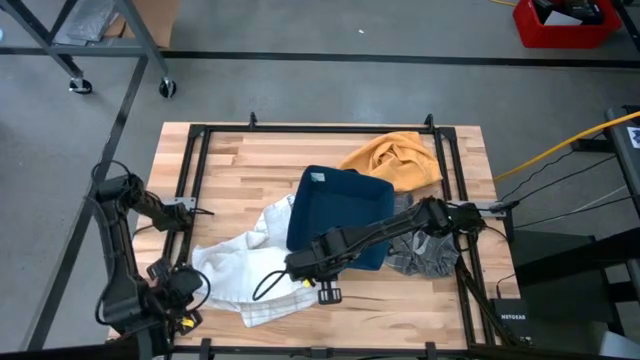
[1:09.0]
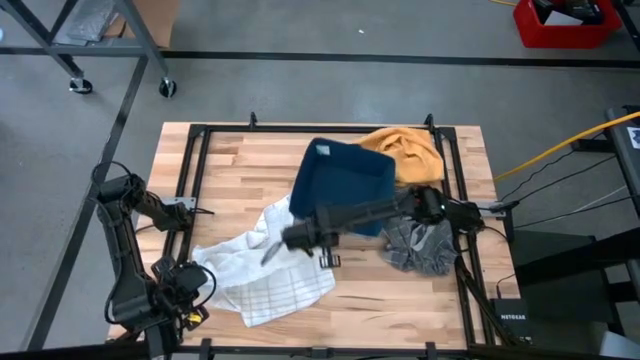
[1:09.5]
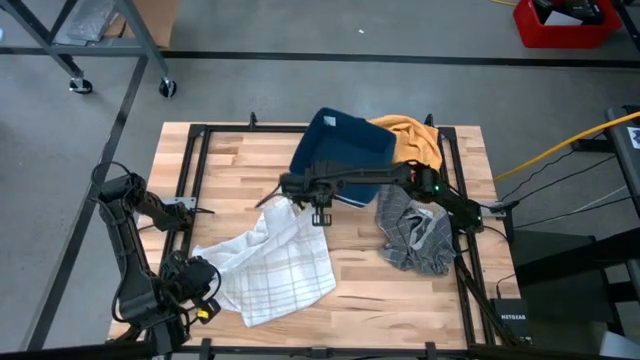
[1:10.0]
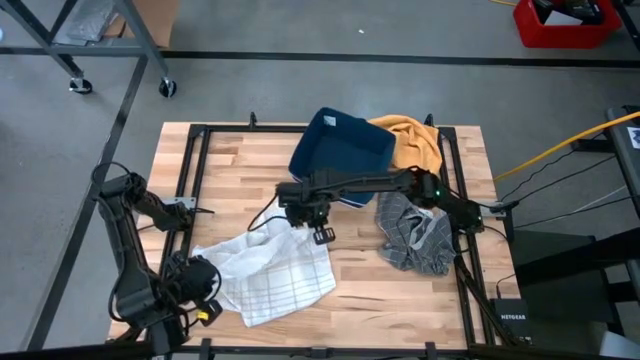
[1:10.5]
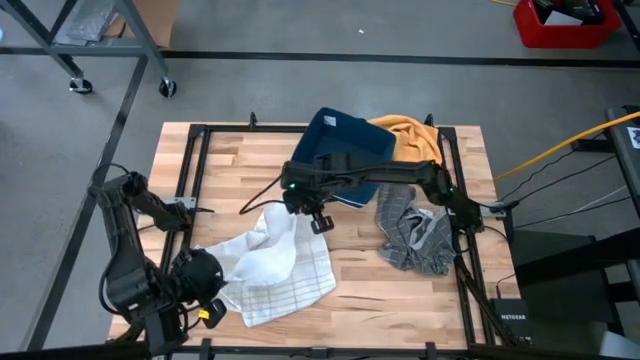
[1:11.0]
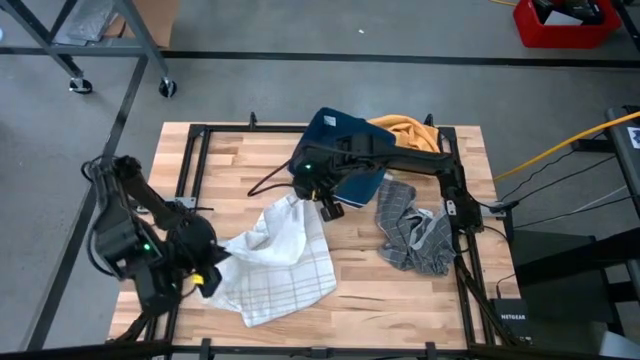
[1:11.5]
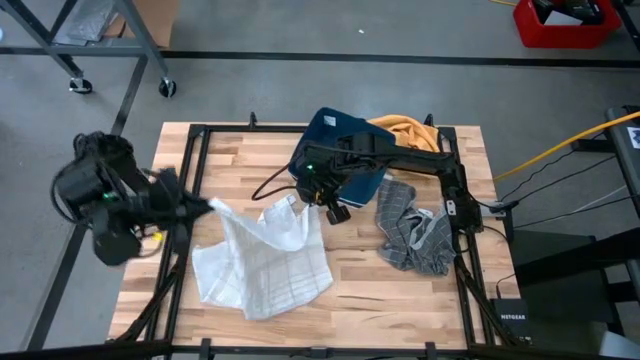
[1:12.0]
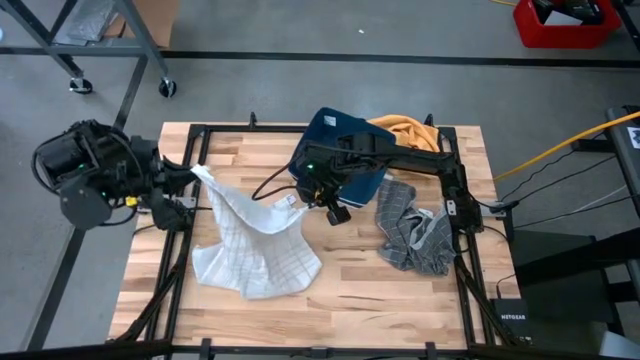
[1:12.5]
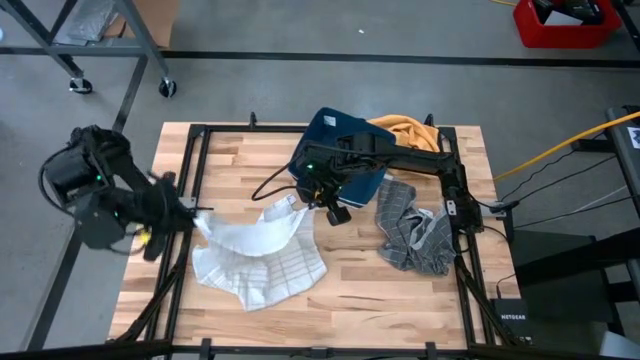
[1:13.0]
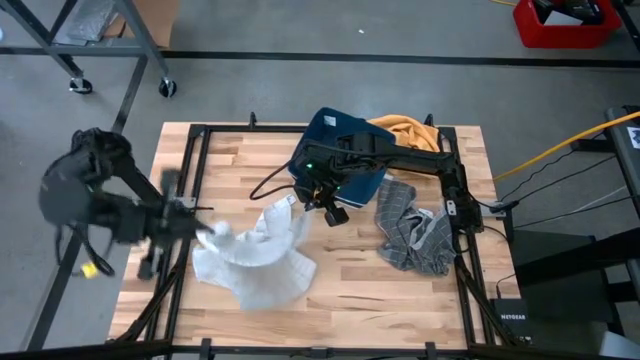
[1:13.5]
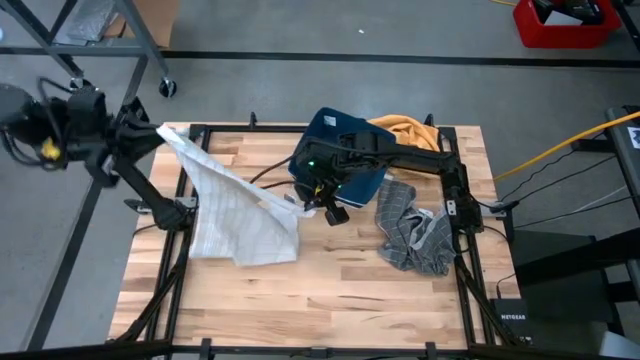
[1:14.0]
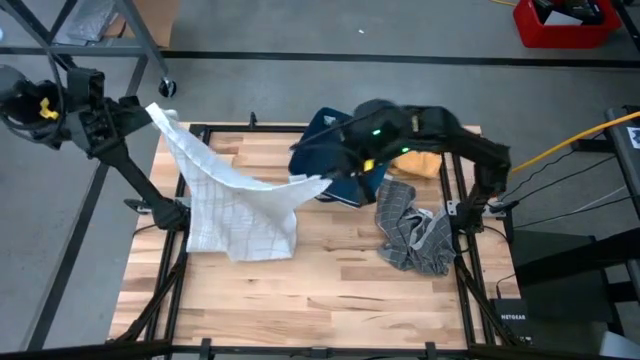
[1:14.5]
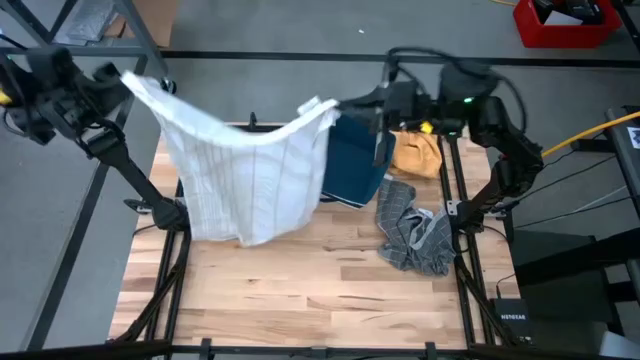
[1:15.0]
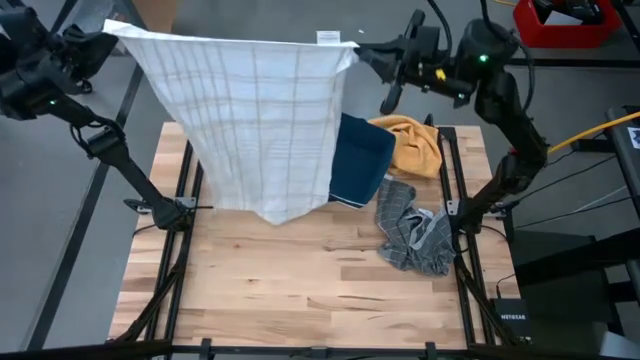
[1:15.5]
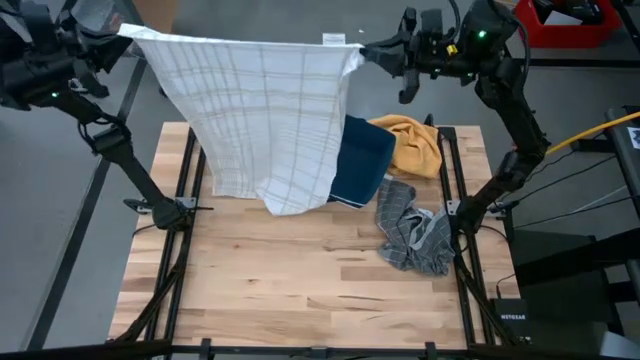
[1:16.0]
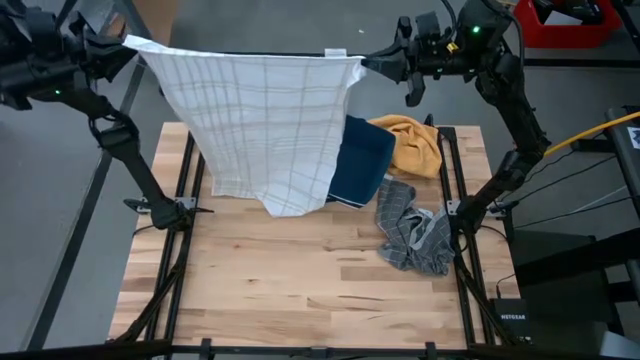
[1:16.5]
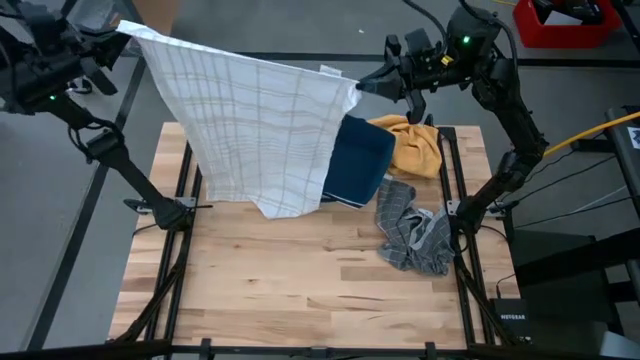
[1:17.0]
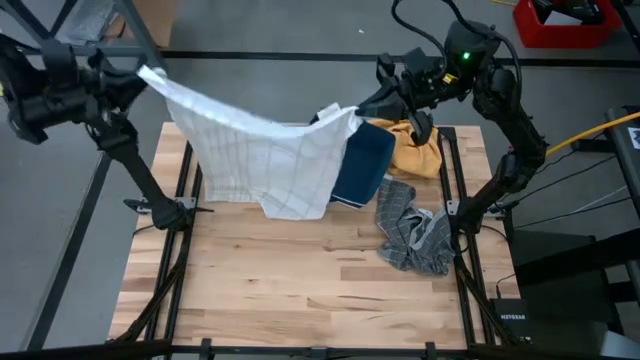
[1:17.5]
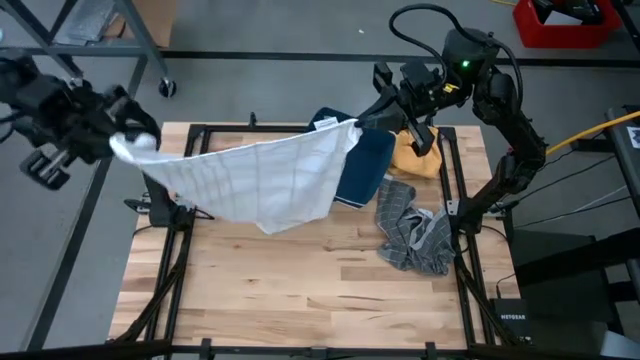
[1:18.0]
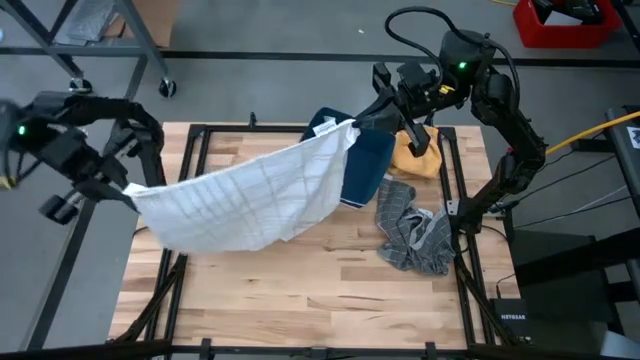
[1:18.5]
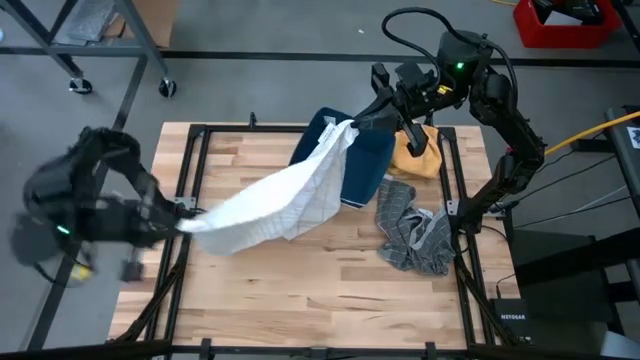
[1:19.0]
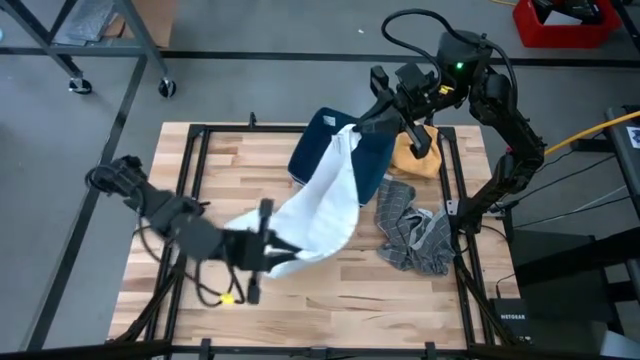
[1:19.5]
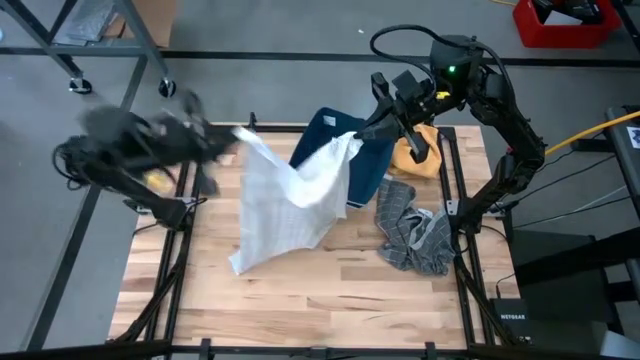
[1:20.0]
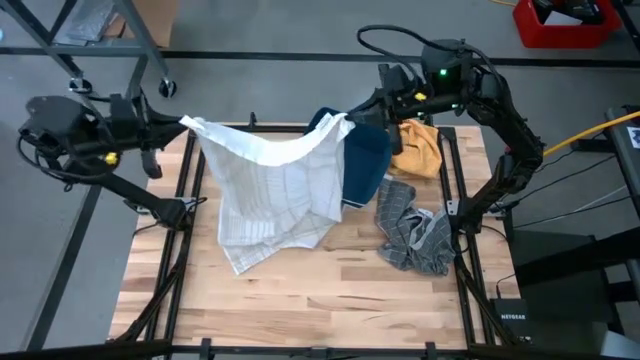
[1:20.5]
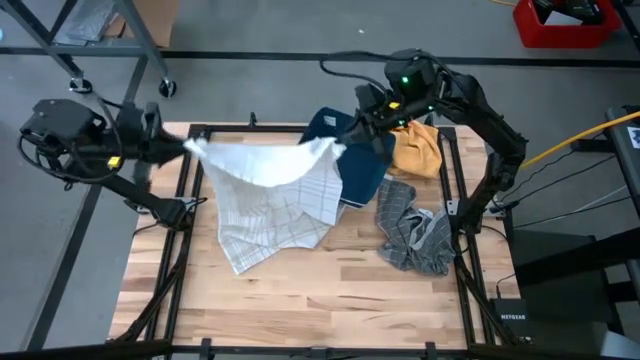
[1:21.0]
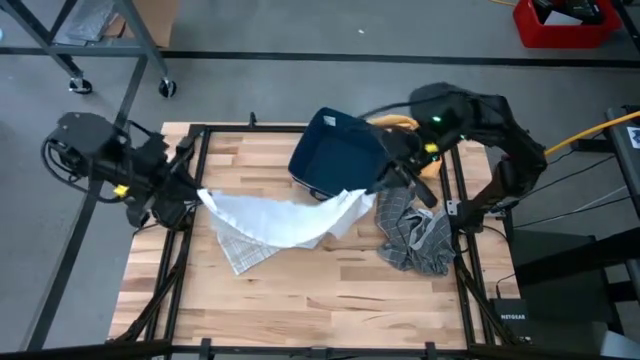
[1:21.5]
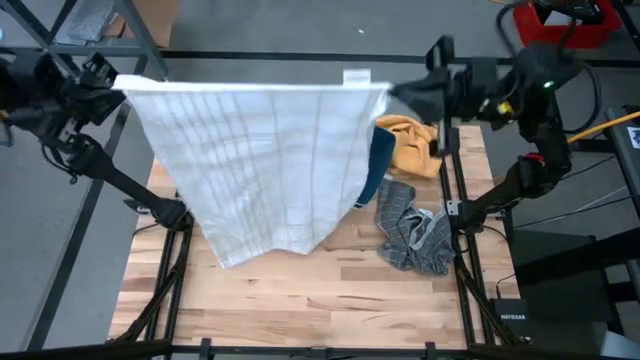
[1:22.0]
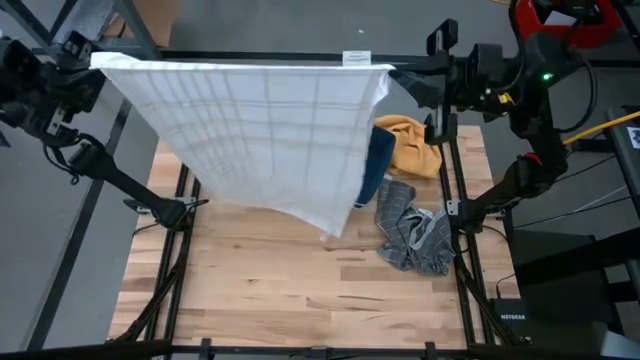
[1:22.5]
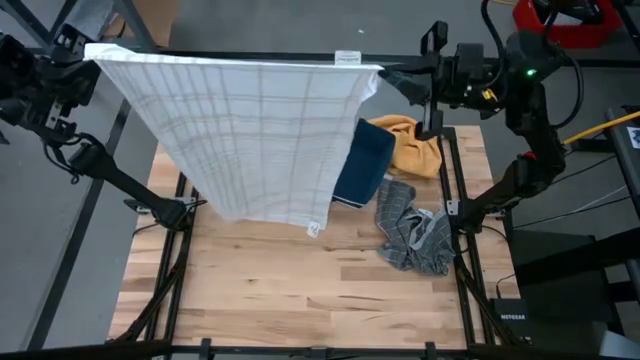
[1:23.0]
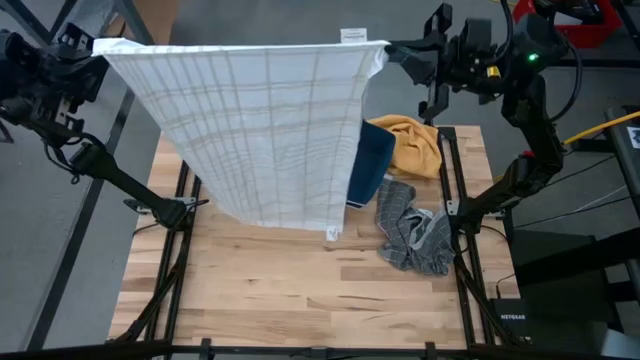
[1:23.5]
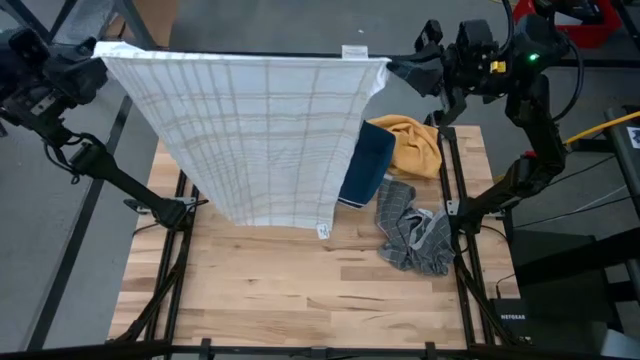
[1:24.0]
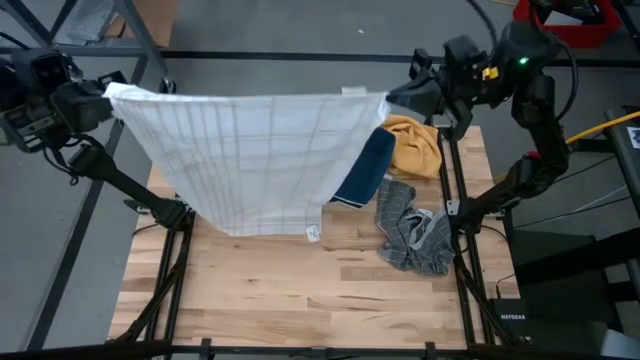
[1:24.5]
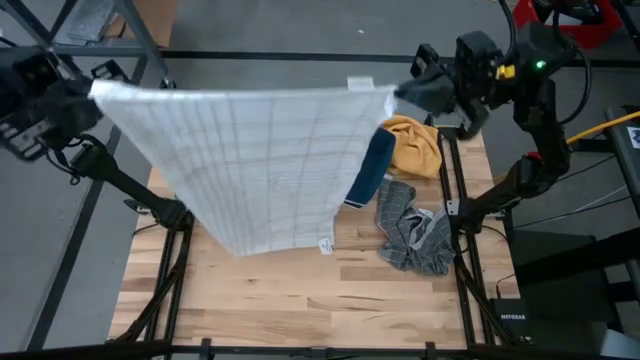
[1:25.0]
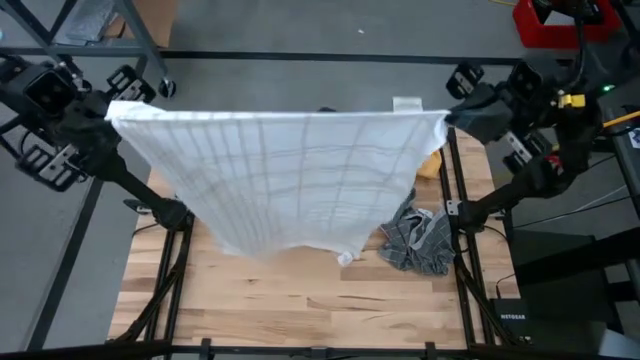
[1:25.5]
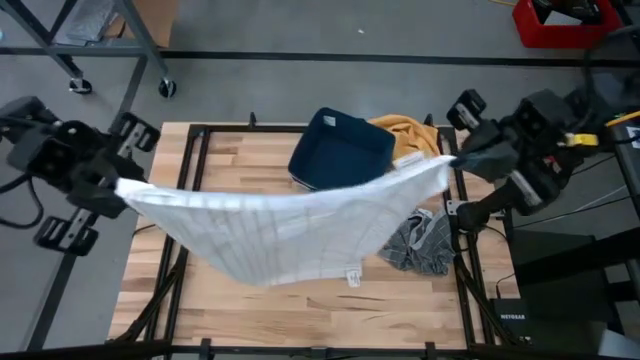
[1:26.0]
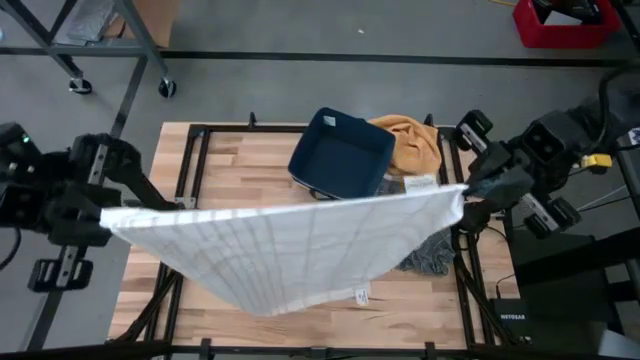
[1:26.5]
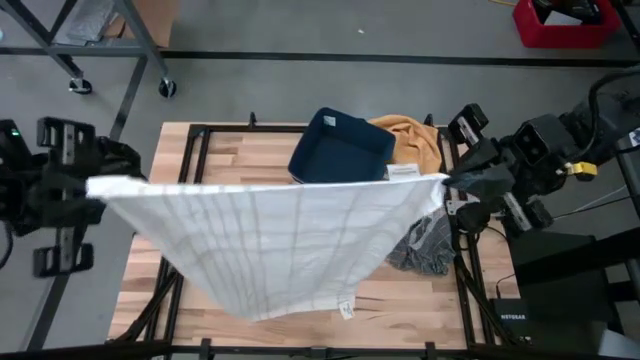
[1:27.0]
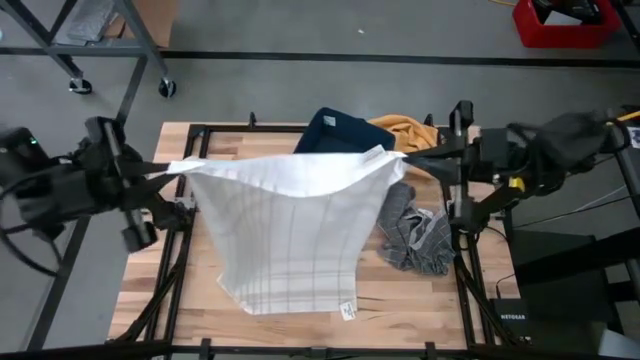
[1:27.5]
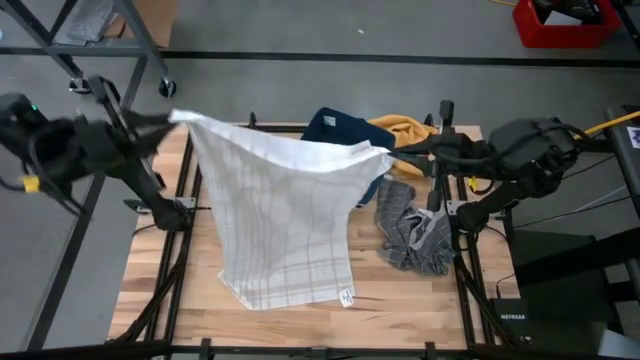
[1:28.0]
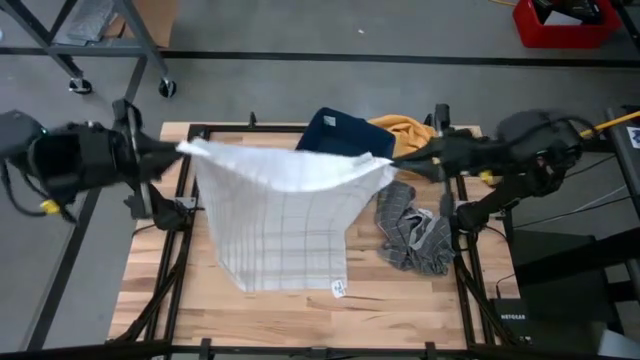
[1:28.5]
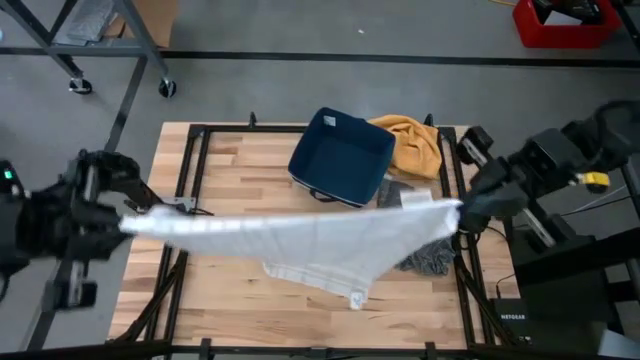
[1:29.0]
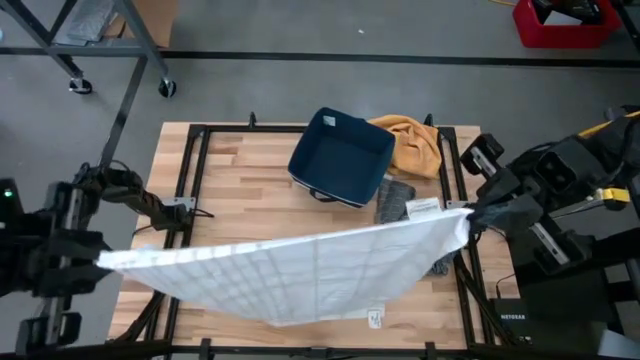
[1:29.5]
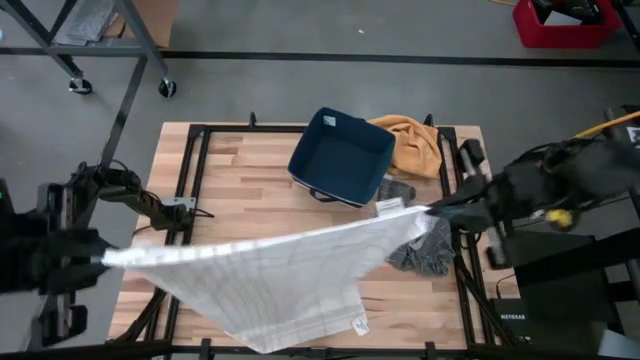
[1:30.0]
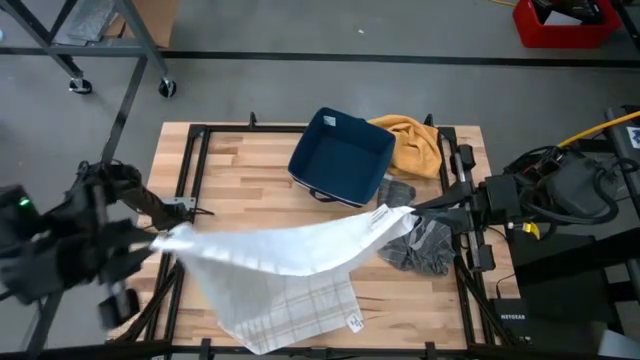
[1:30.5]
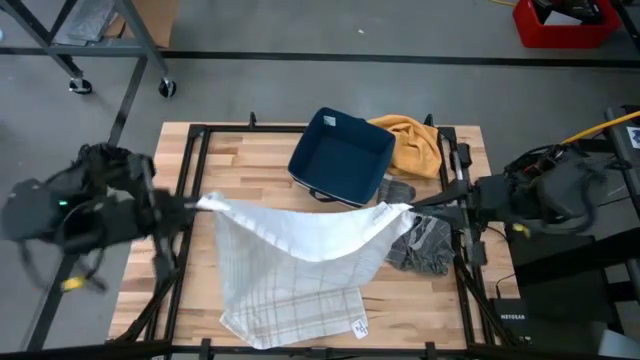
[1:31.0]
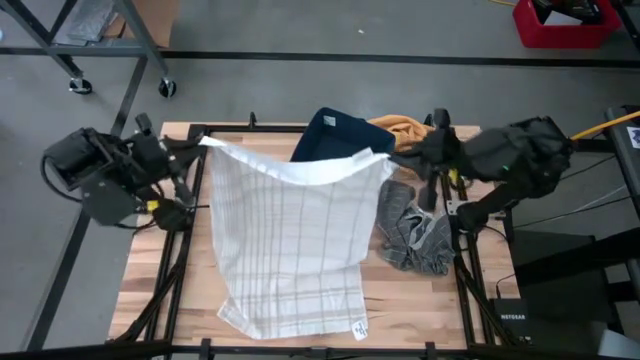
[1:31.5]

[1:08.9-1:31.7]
Task: Fold towel
Fold the white patterned towel
